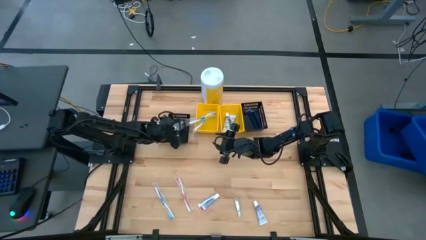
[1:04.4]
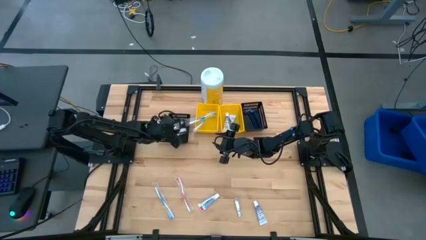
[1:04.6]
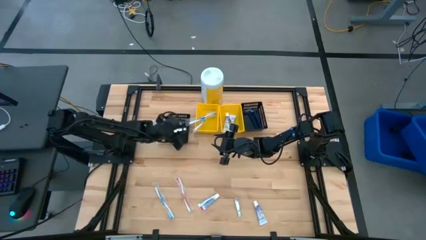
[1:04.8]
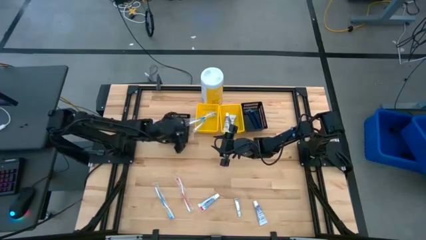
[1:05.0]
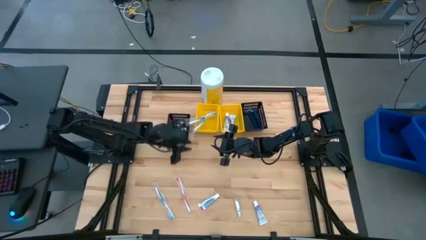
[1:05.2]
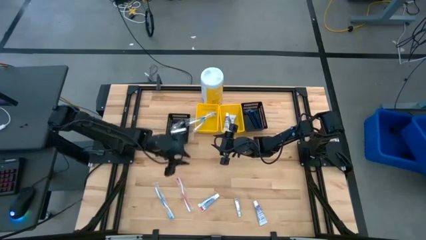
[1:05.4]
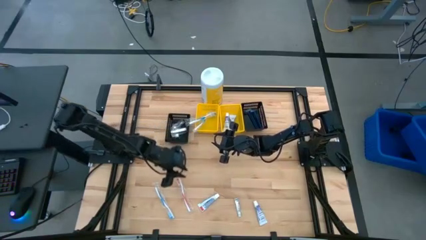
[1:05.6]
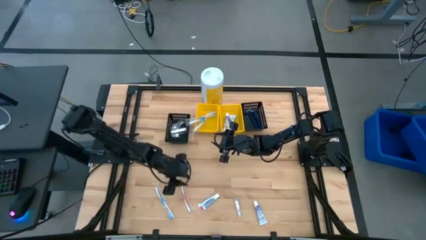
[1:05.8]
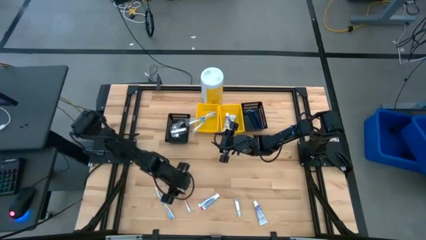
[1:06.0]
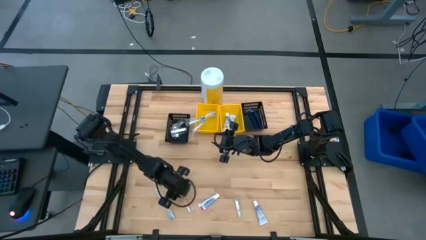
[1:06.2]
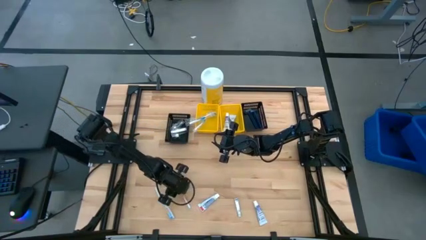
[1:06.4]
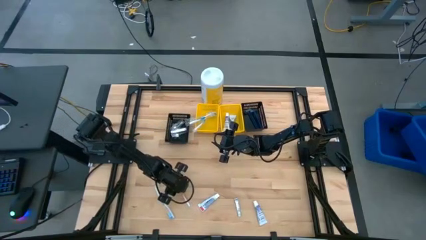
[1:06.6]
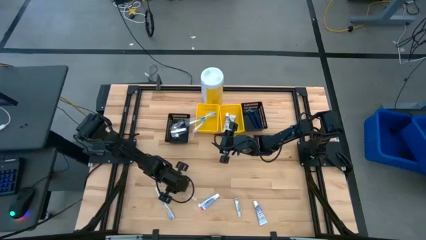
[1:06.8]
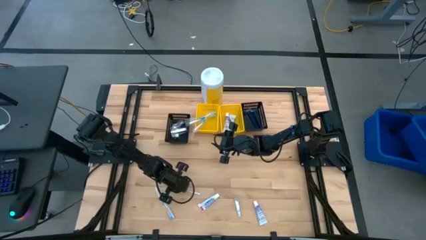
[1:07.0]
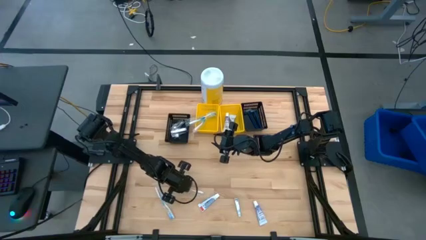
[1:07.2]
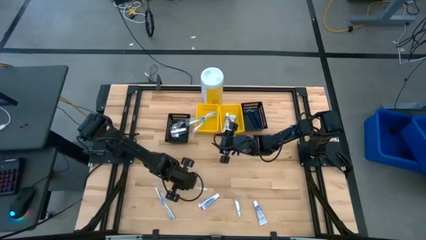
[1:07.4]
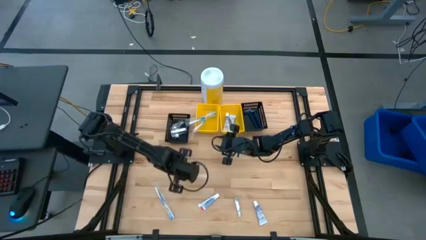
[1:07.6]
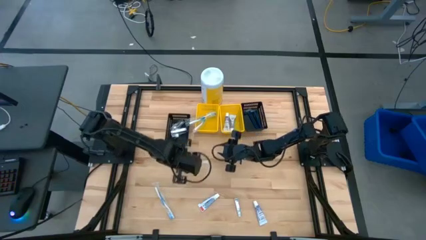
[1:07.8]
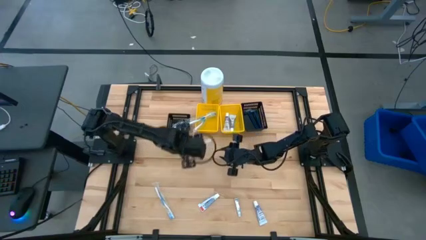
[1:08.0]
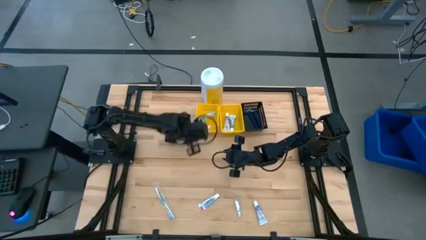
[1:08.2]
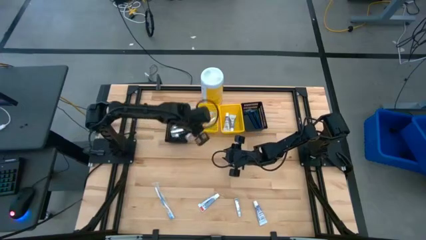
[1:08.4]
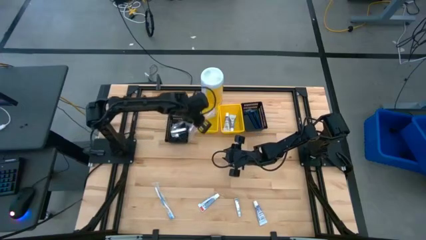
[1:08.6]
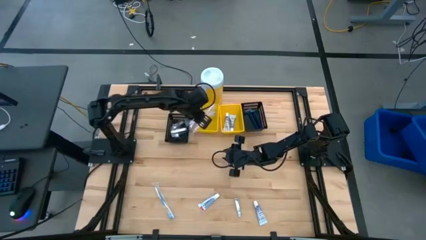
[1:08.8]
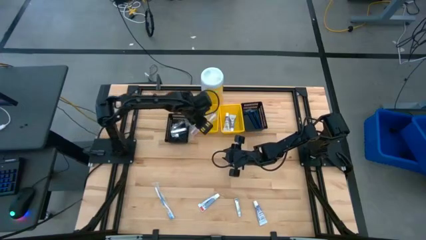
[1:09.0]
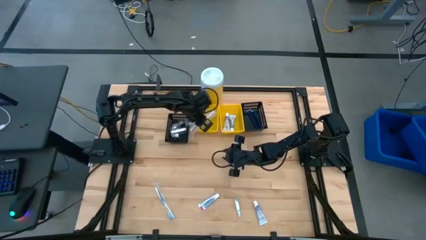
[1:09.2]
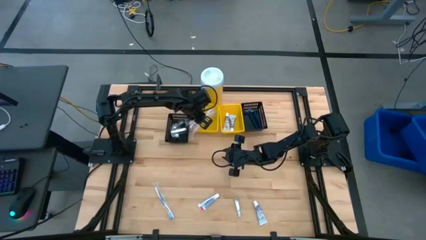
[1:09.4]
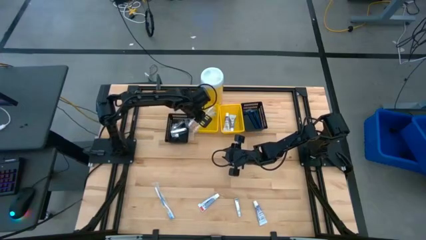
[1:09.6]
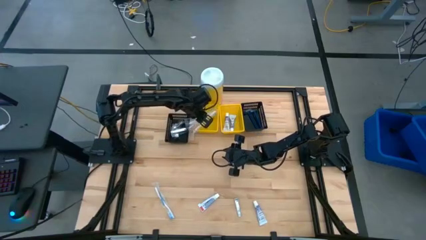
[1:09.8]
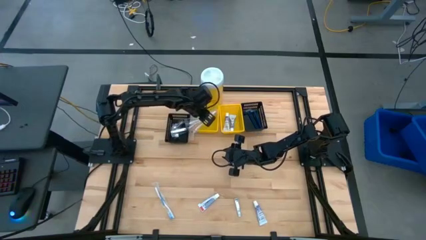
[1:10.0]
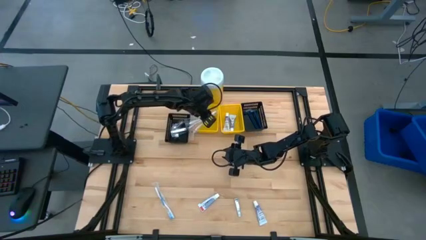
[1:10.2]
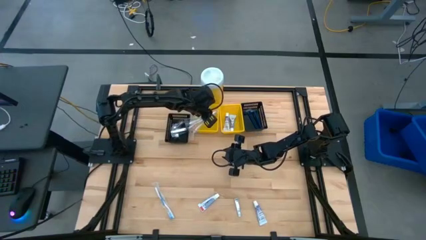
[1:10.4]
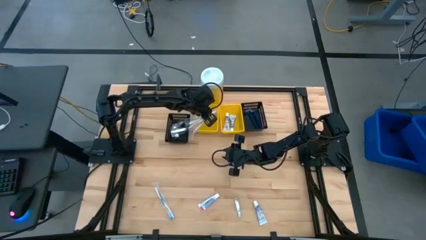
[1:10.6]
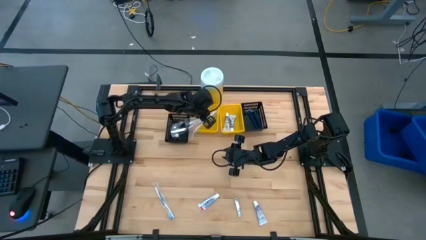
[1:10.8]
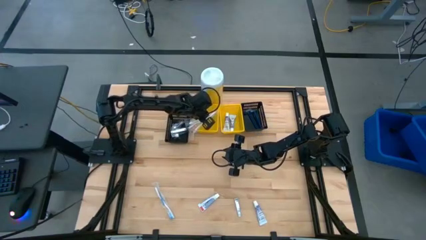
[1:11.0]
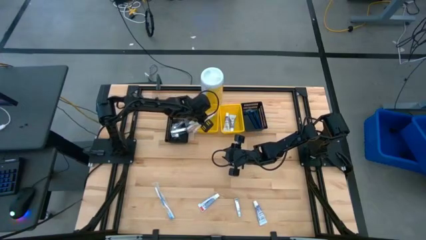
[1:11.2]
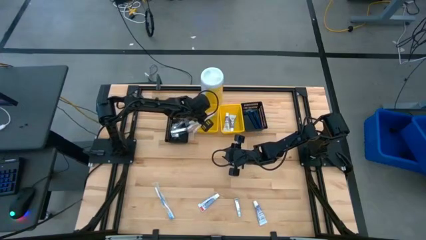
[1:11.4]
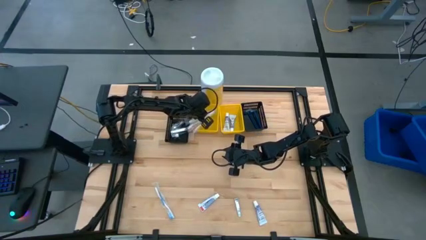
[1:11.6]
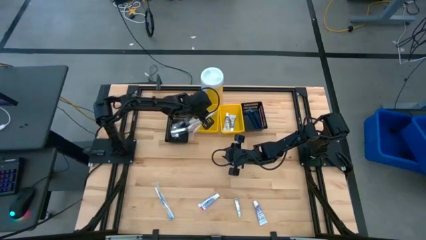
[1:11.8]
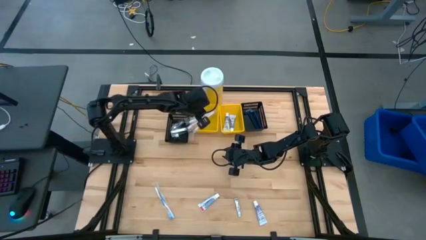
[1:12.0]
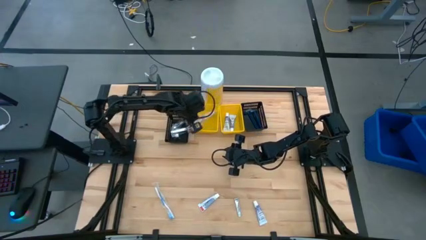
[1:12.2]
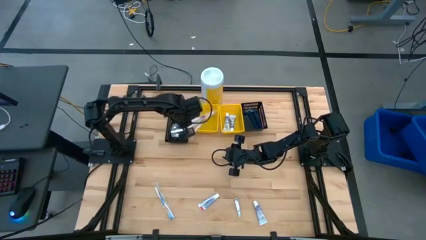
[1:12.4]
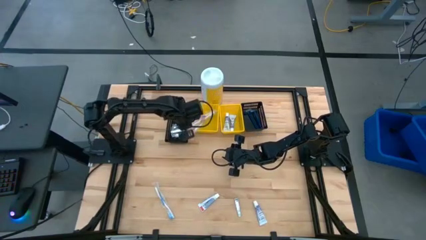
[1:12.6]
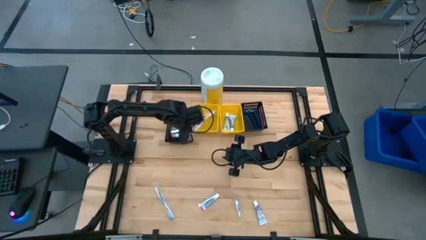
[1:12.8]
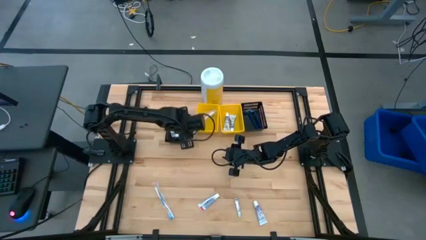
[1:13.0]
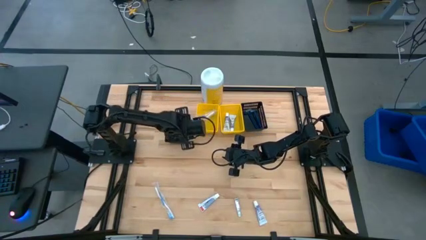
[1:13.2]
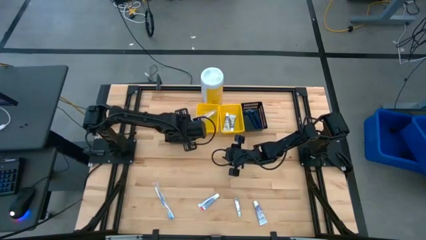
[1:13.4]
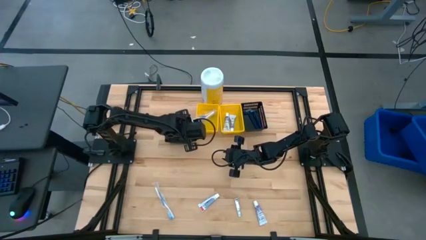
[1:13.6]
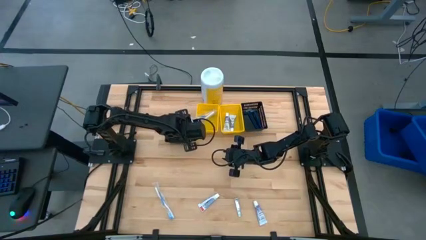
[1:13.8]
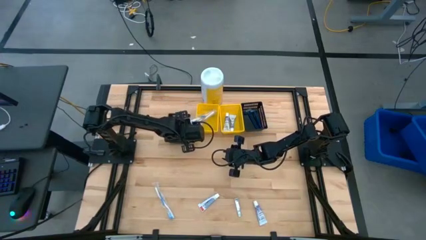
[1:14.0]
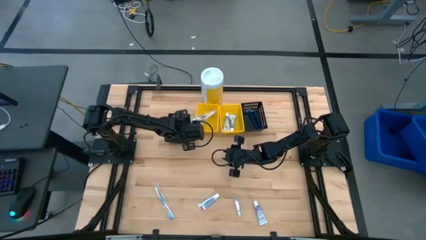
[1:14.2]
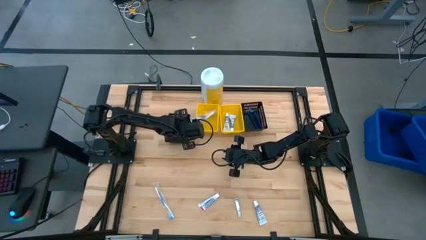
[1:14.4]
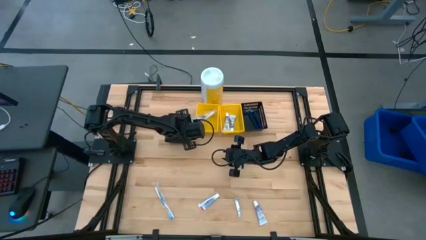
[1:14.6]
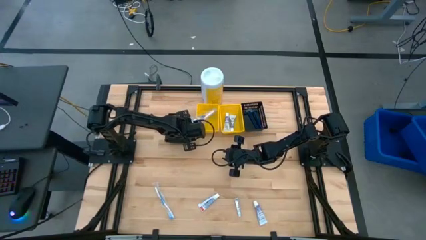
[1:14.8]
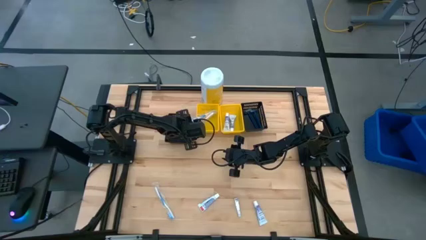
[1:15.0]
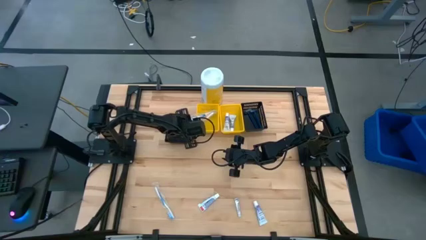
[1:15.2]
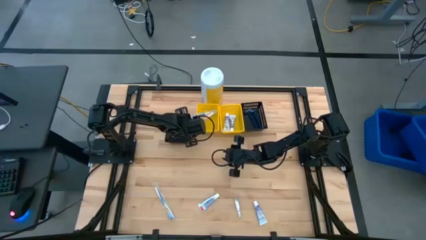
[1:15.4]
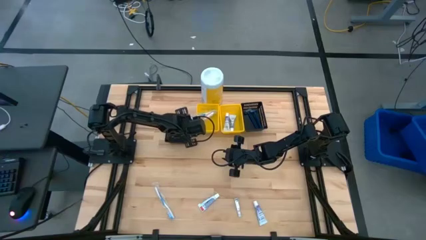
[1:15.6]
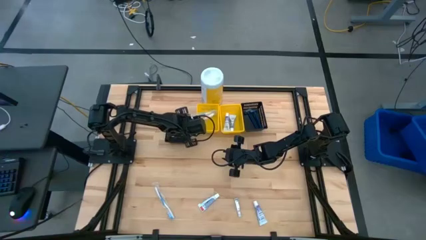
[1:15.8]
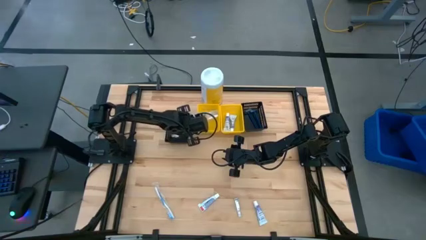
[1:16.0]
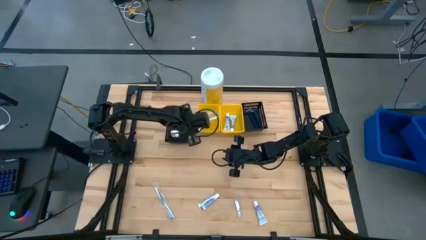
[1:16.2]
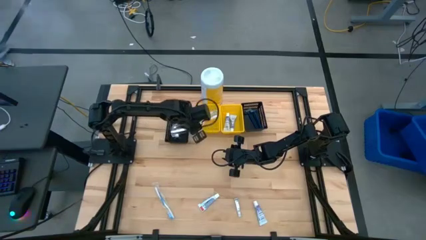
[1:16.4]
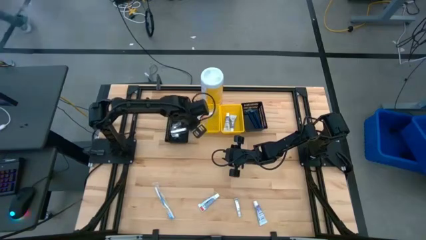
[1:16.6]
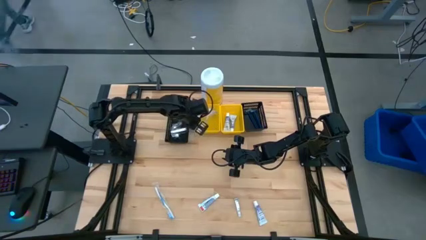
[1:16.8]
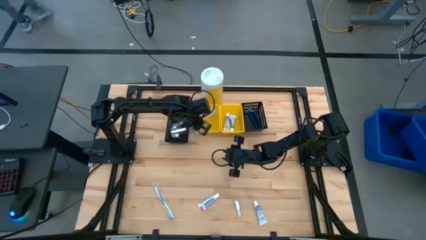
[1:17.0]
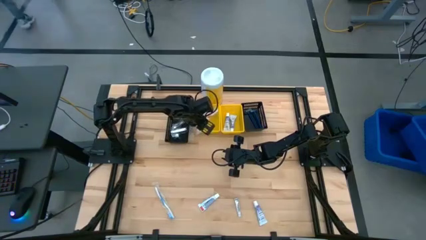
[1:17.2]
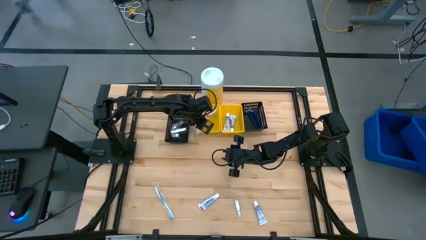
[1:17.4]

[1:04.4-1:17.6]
Task: Pick & Place Travel size toiletries
Put the red toothbrush into the left yellow bin

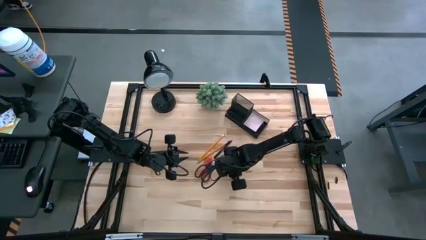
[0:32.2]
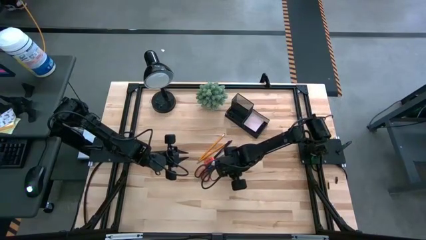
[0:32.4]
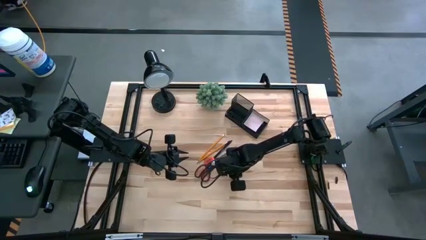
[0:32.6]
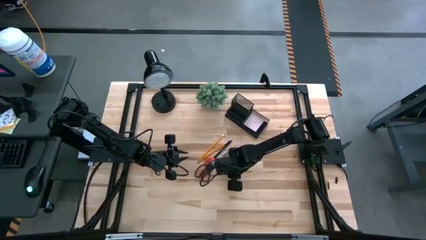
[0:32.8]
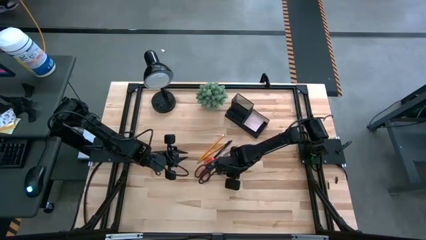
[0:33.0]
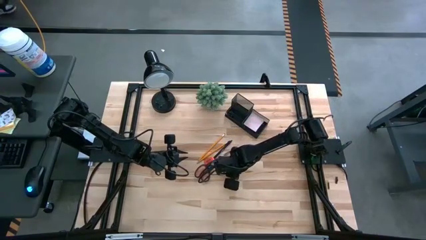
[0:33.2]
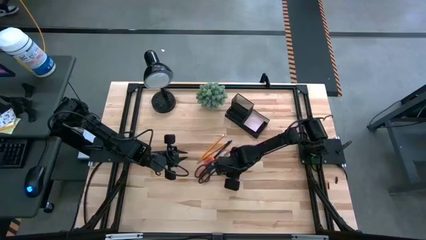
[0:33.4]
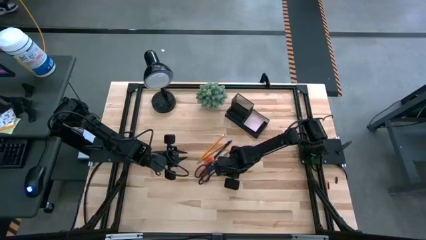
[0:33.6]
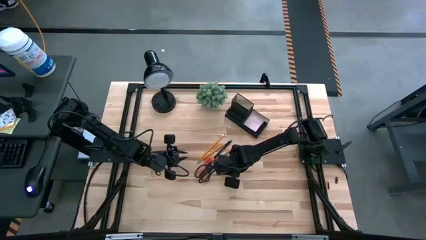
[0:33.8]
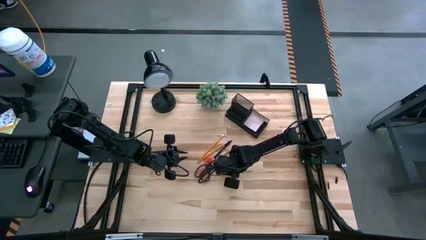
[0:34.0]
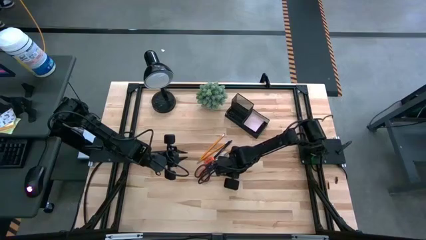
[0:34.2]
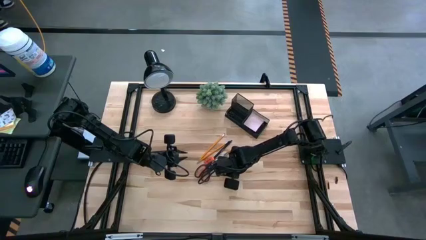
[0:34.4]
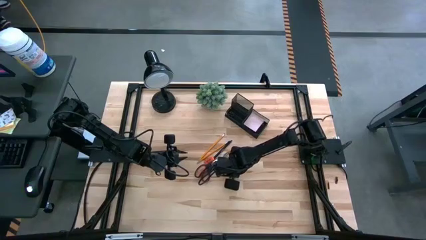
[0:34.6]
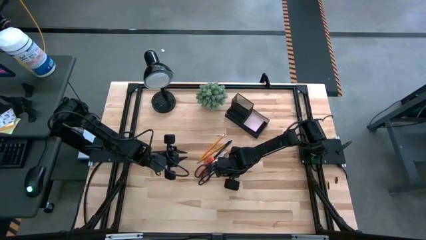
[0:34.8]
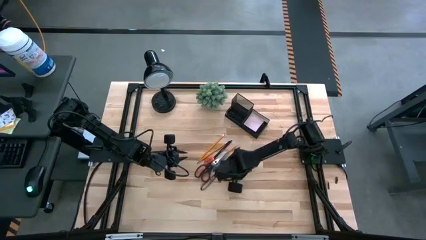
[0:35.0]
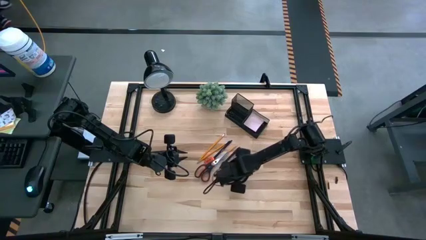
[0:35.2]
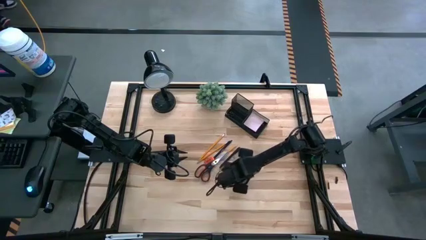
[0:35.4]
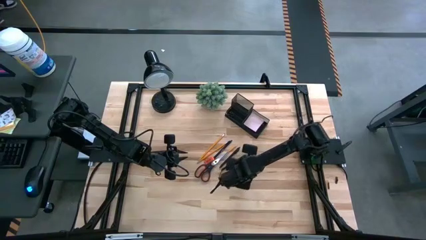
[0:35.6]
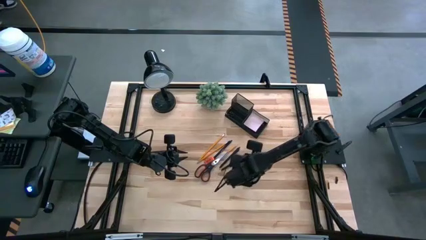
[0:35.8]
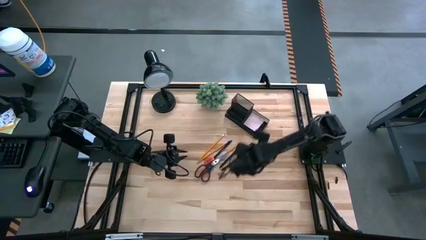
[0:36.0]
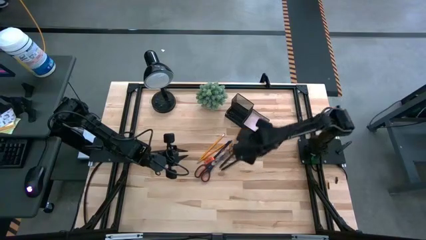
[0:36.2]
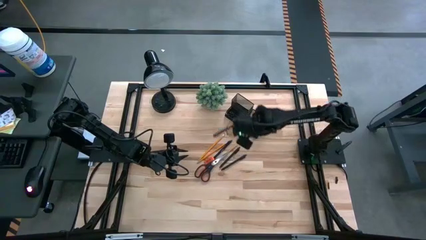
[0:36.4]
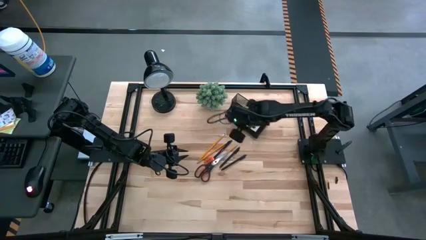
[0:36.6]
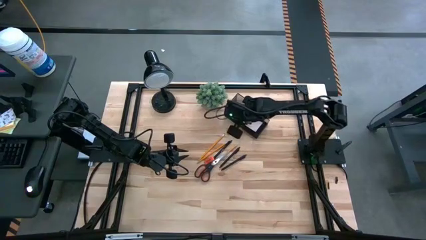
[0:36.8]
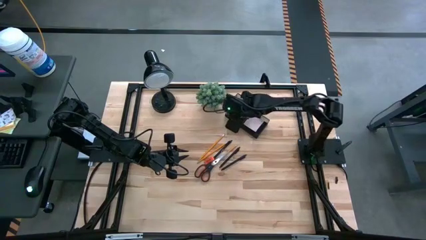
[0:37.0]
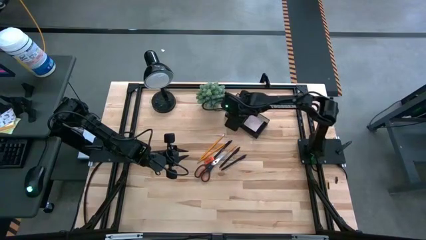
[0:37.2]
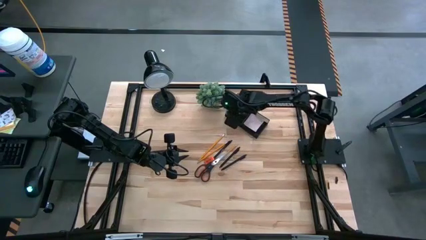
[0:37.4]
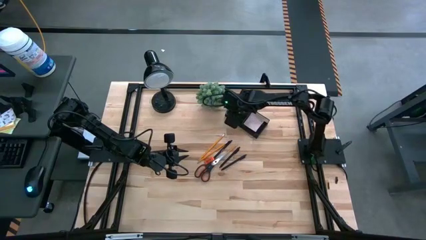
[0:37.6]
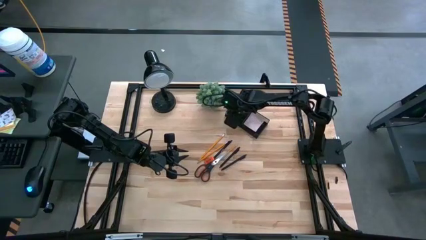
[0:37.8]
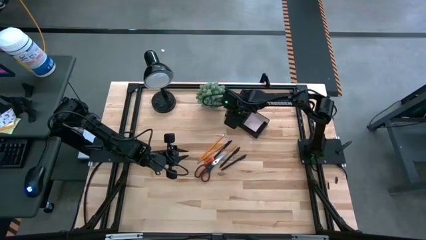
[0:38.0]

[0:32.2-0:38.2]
Task: Pick and place office supplies into organizer
Put the black binder clip into the black desk organizer
